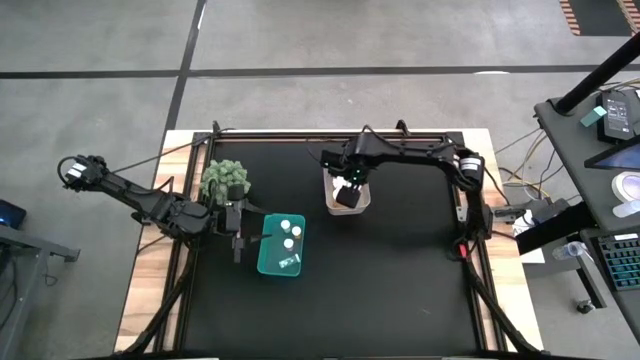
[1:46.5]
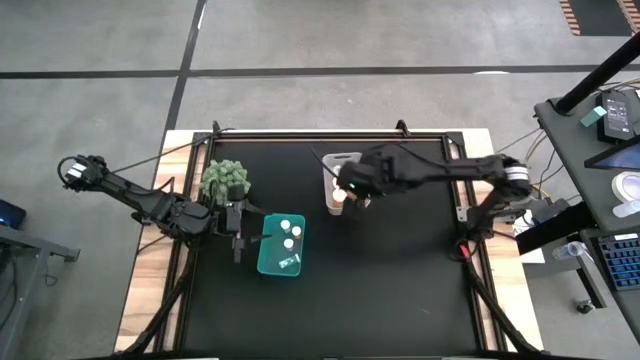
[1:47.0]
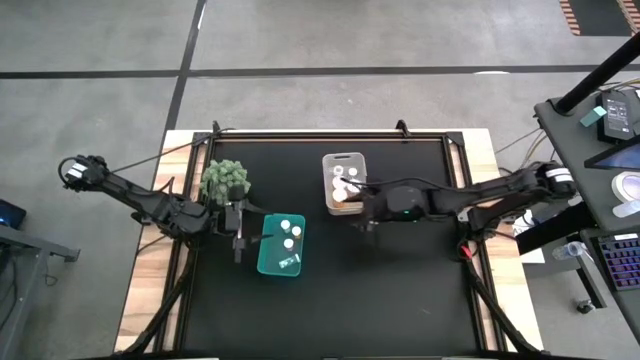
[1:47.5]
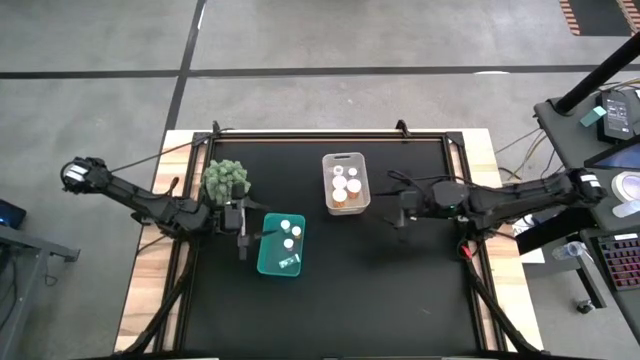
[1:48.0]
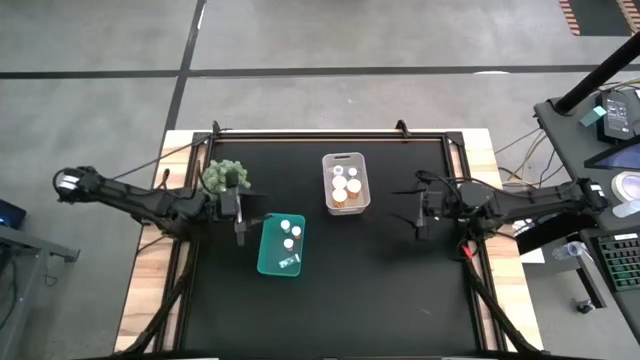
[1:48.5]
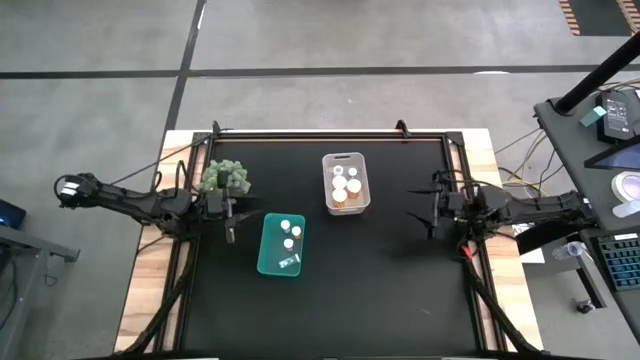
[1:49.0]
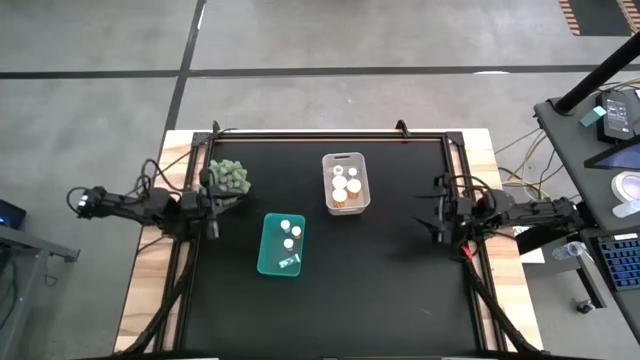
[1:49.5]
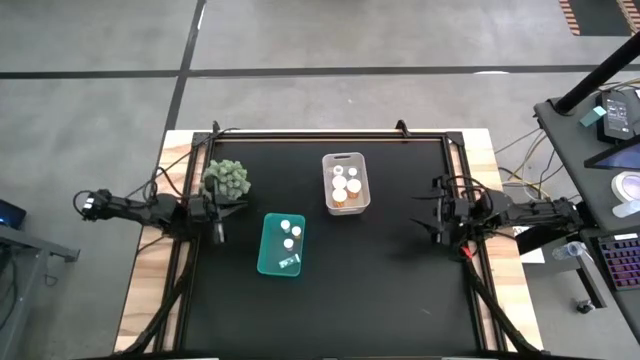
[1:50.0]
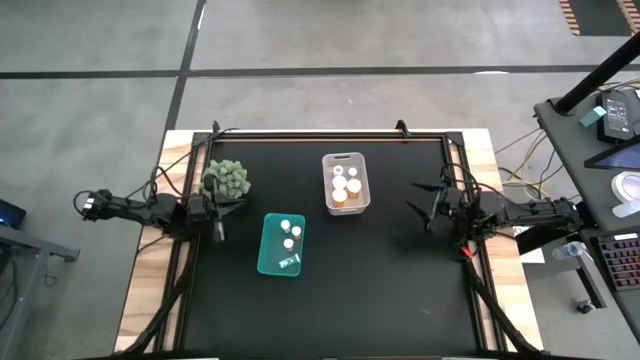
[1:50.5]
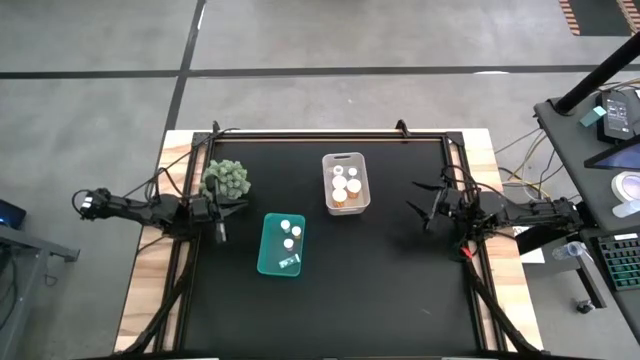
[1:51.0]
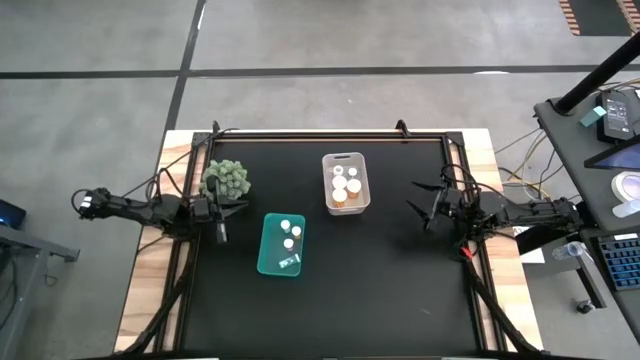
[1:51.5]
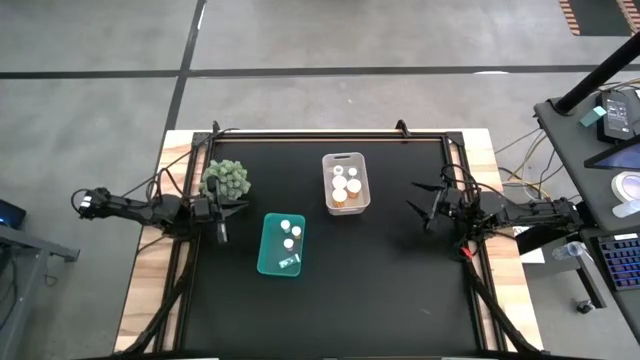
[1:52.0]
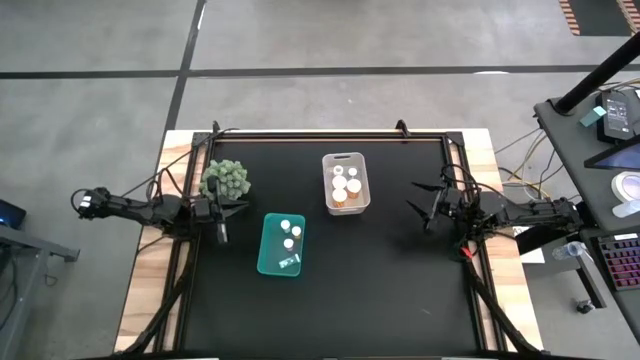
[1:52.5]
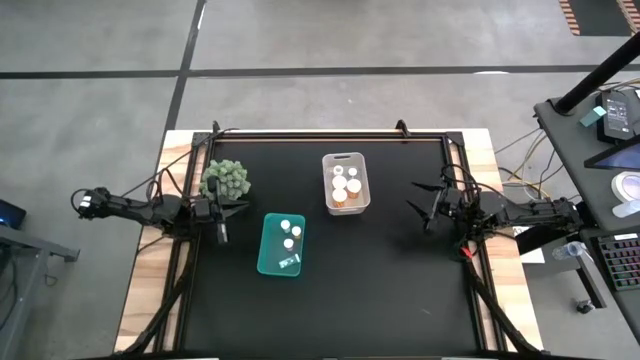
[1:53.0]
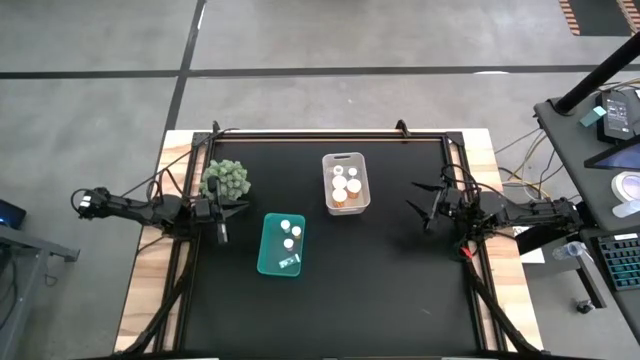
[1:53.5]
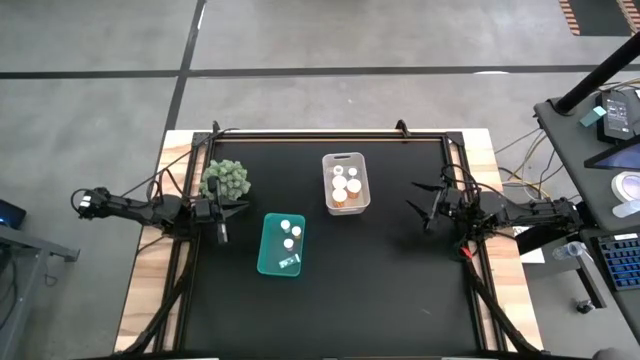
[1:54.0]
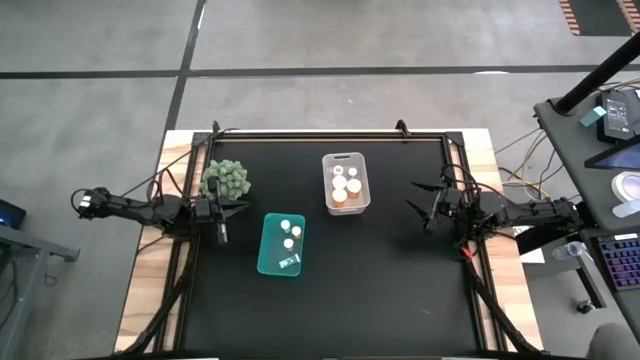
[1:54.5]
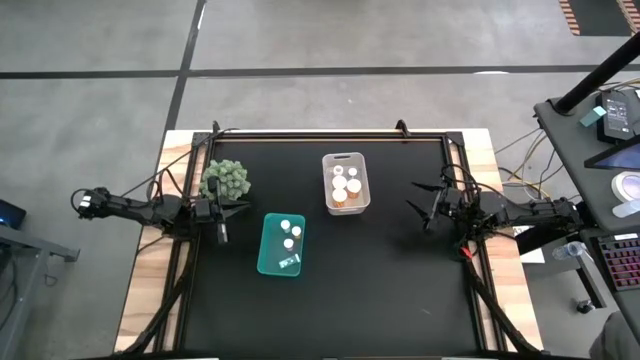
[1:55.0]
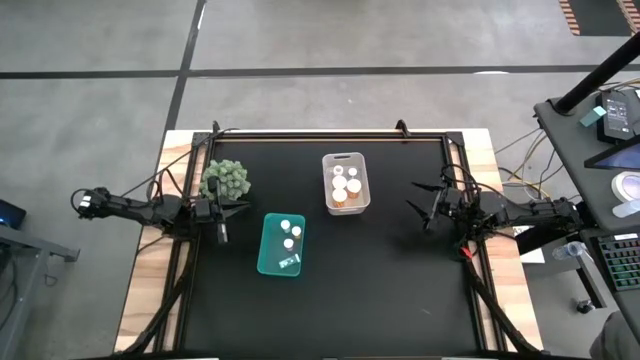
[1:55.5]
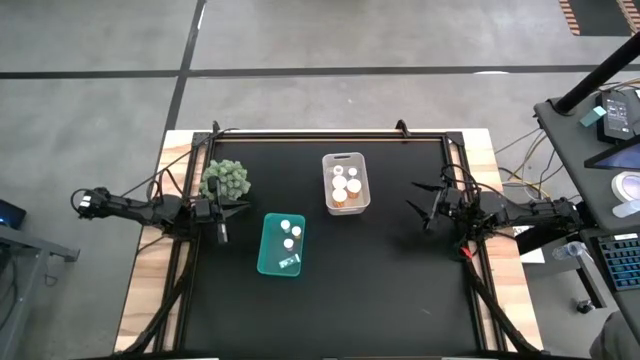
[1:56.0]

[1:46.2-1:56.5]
Task: Pick and place medicine bottles into bin by pill shape (circle, oval)
Return to Home Position

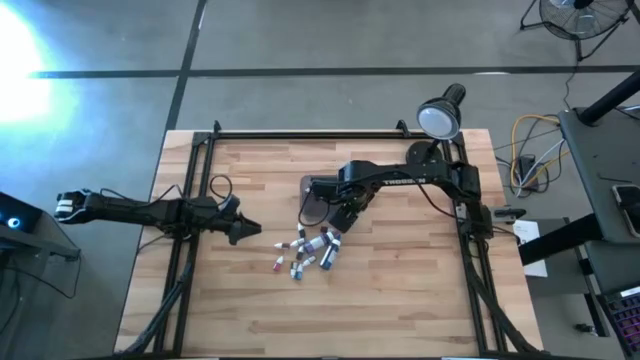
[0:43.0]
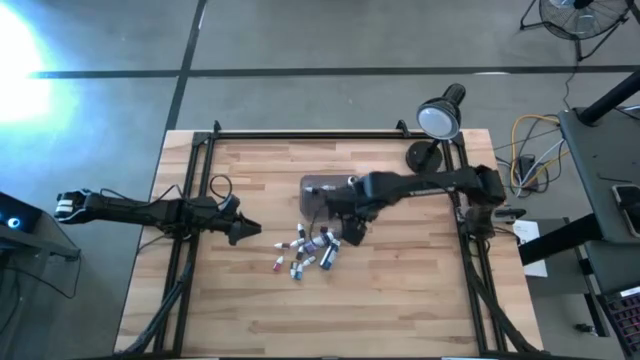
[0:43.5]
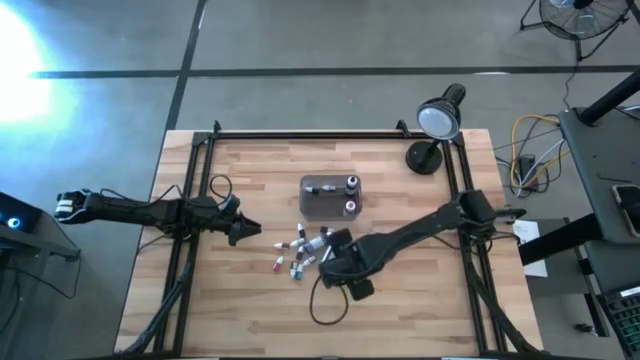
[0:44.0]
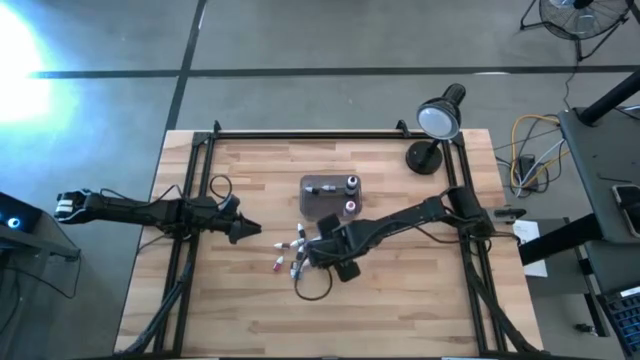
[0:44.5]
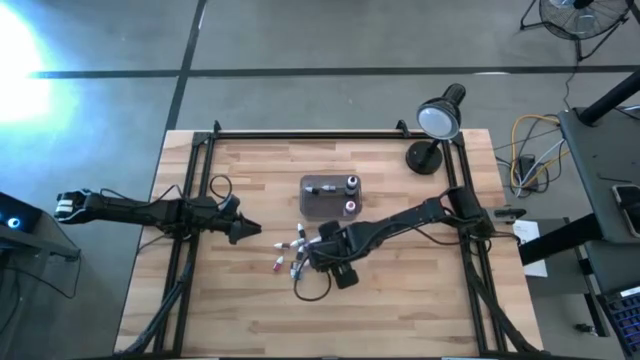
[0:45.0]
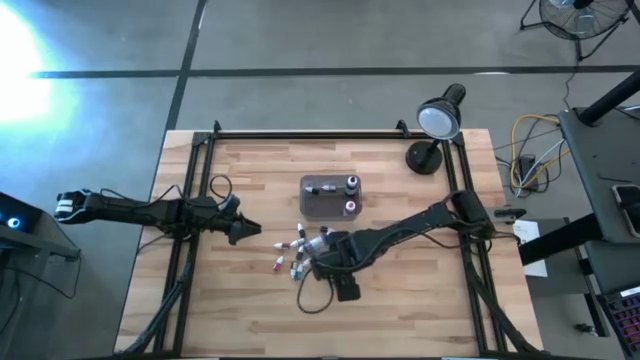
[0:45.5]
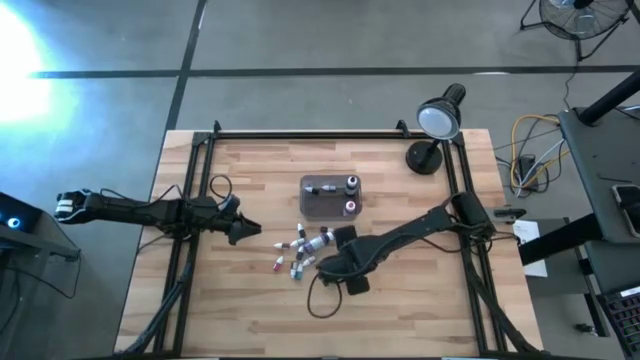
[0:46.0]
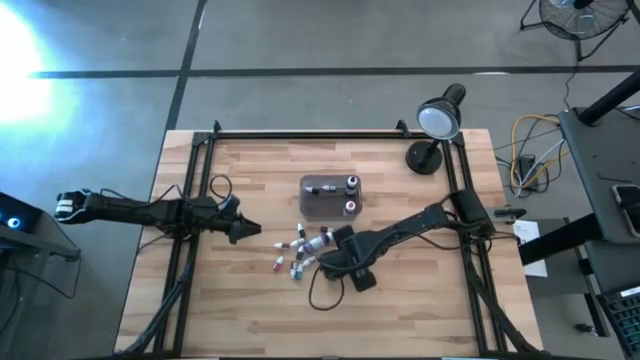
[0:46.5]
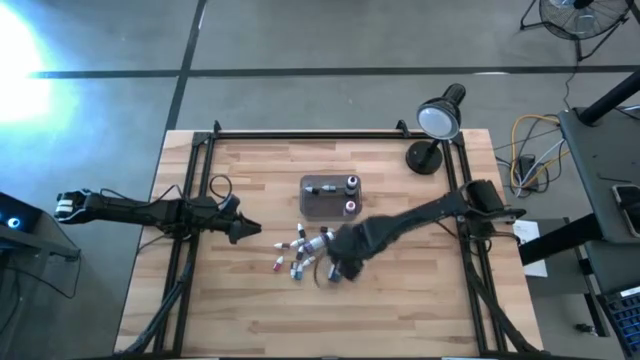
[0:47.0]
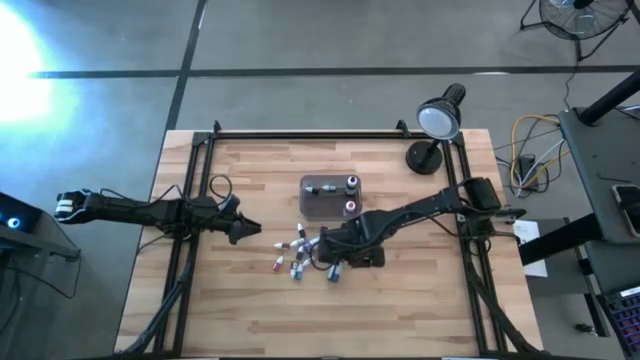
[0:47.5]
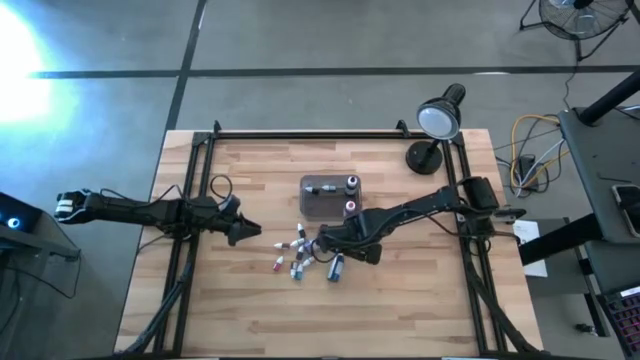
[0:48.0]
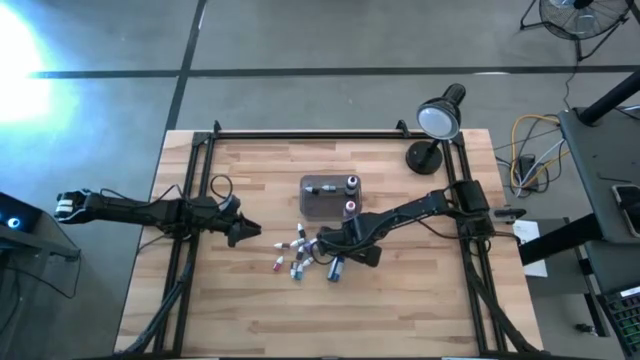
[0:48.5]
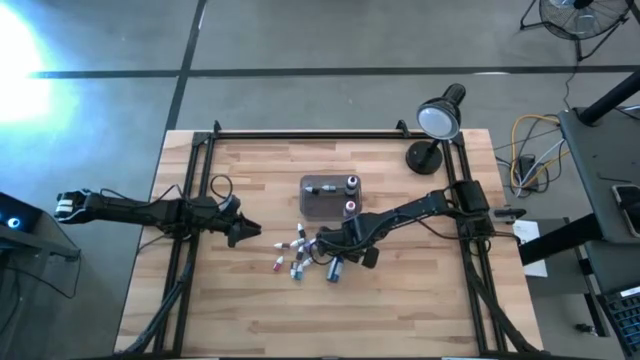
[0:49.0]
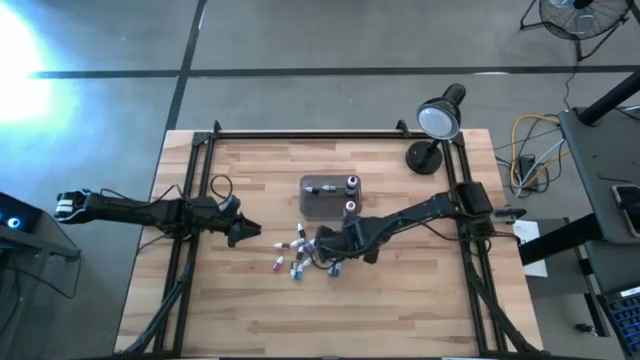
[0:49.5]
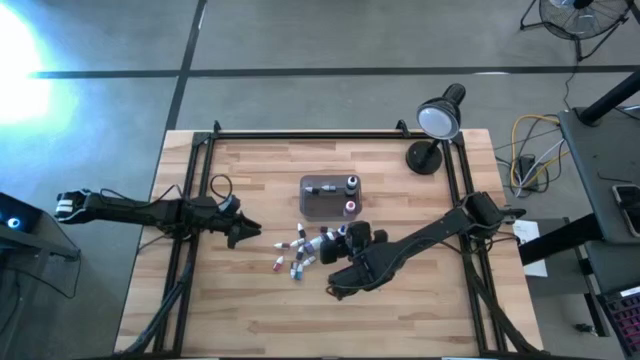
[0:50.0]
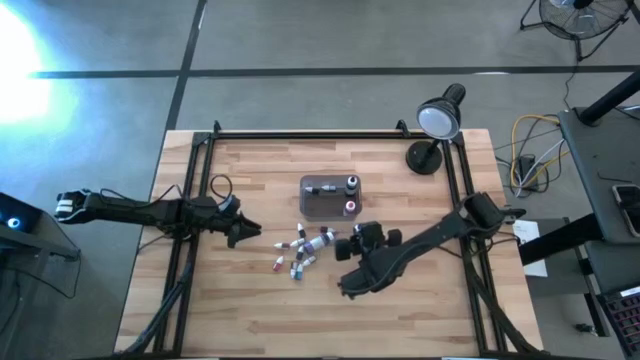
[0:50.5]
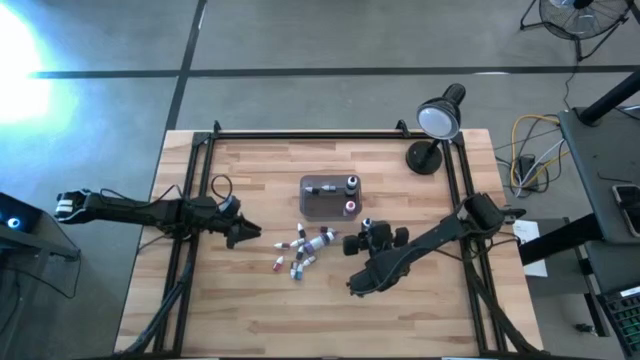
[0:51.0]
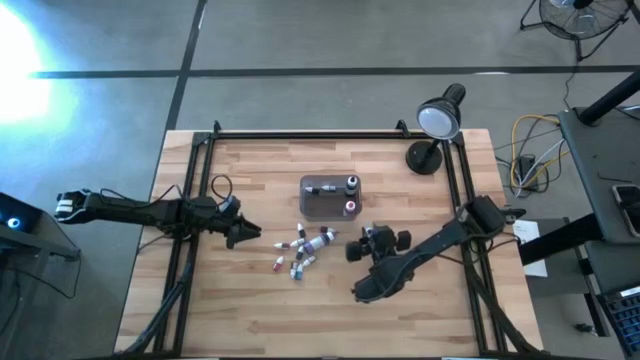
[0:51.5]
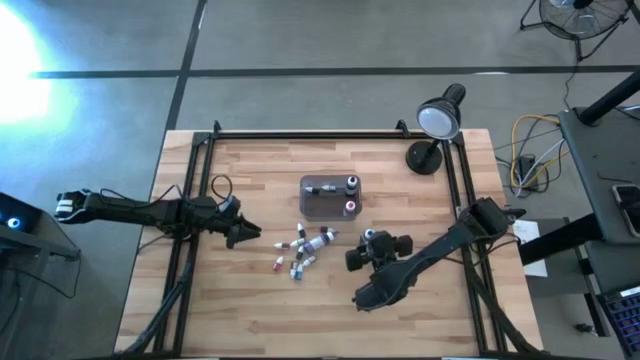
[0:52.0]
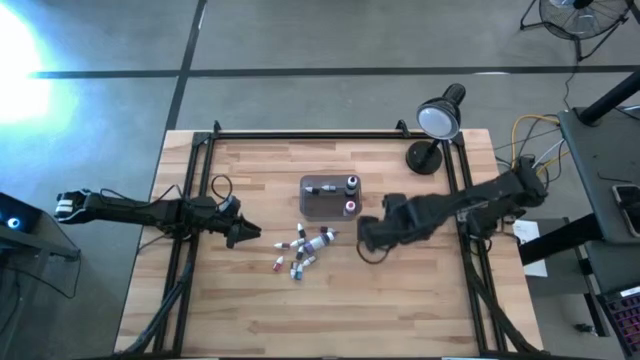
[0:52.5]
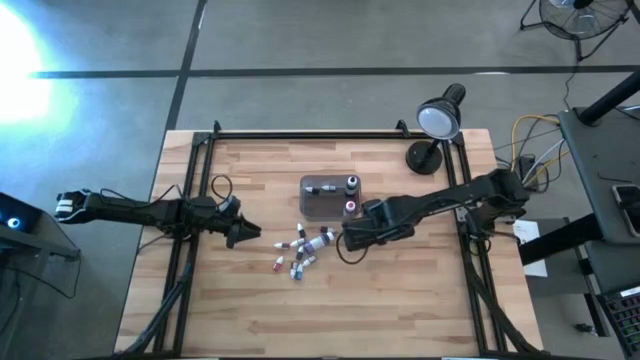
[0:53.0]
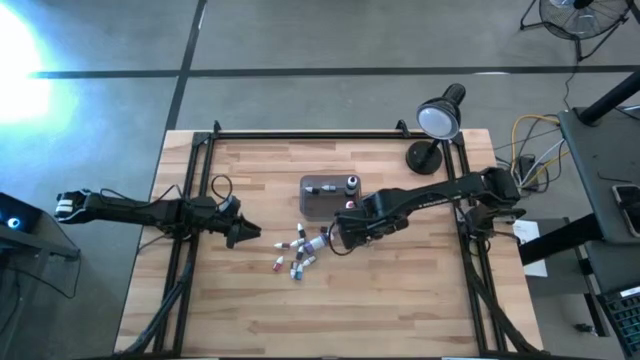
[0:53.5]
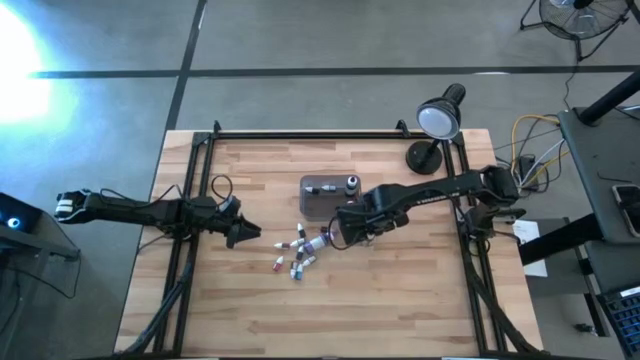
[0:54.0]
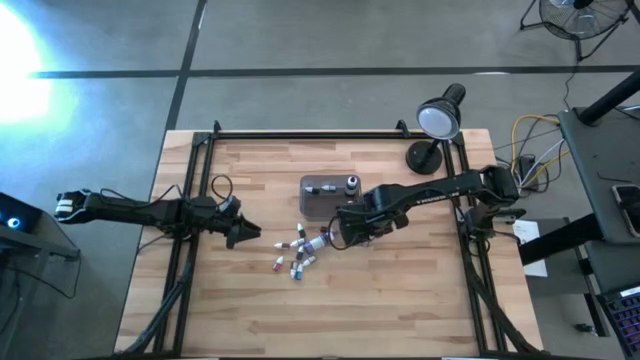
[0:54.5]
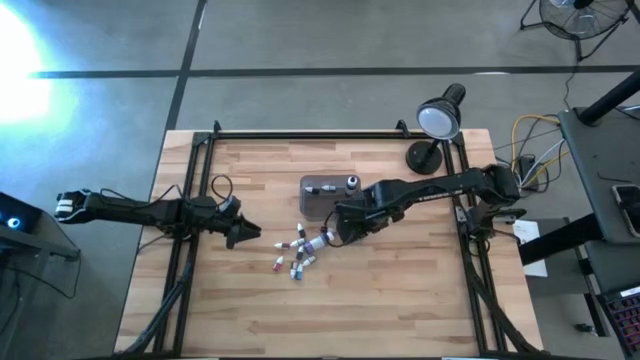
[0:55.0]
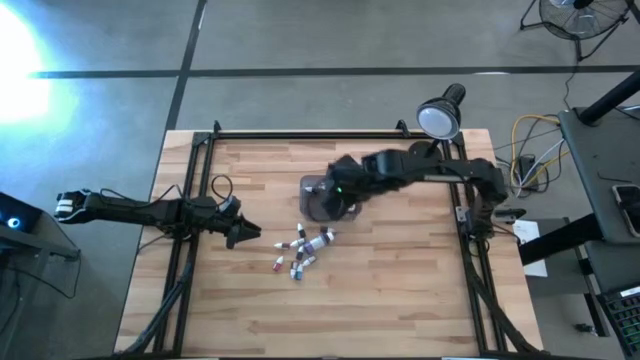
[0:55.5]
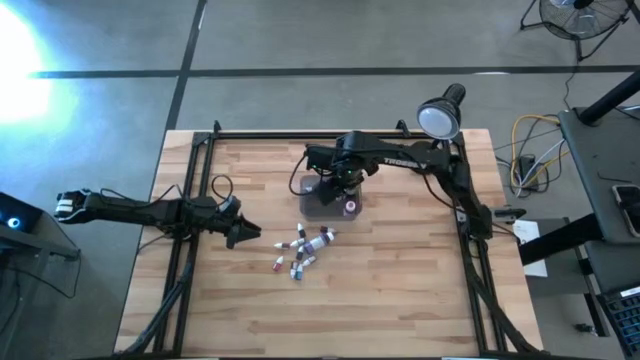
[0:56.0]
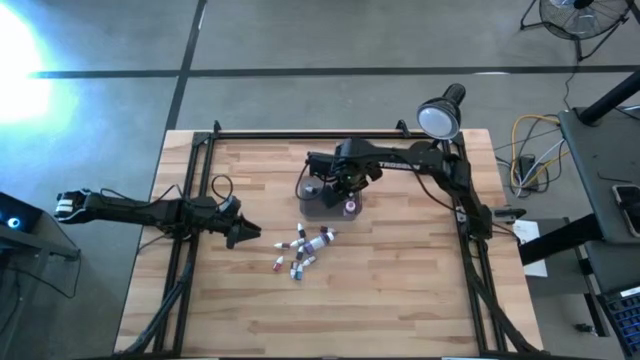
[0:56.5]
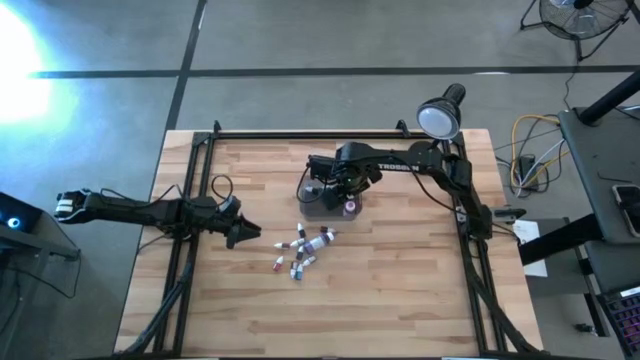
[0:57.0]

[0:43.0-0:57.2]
Task: Pick & Place food coloring
Put the large blue food coloring bottle into the bin
